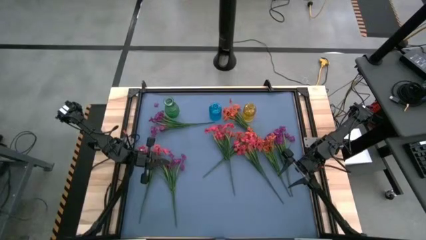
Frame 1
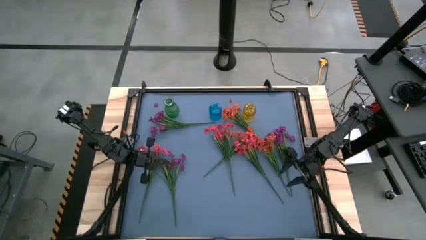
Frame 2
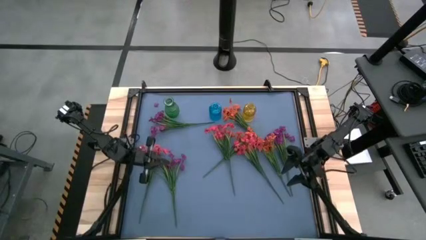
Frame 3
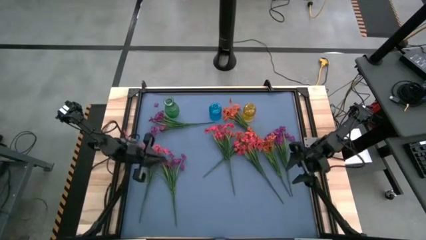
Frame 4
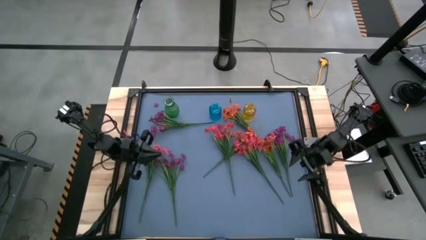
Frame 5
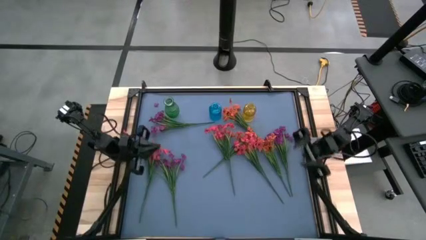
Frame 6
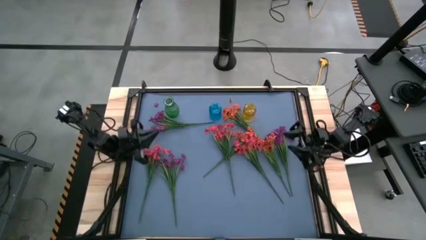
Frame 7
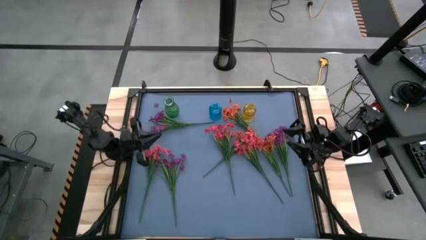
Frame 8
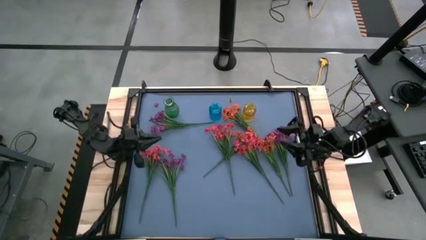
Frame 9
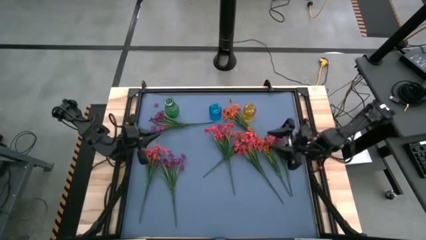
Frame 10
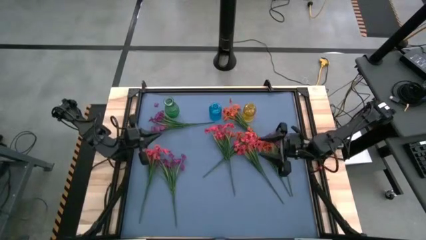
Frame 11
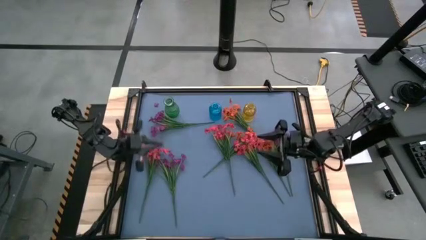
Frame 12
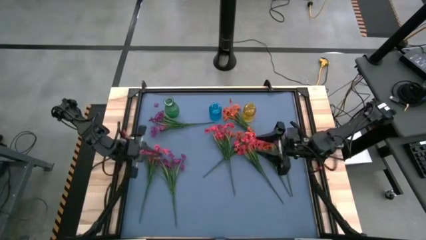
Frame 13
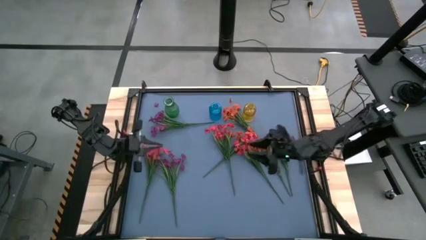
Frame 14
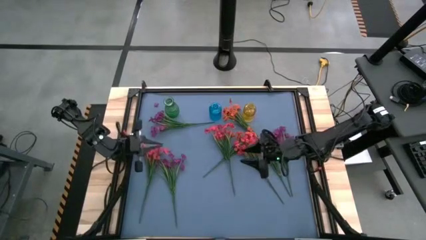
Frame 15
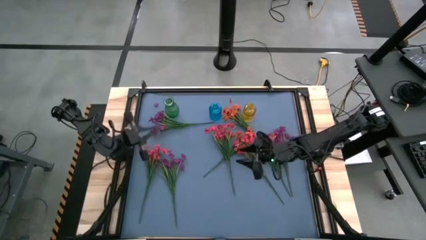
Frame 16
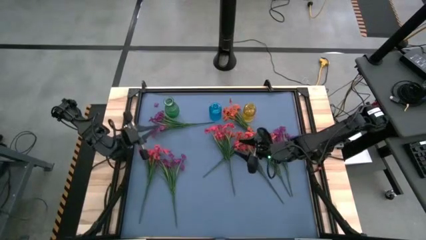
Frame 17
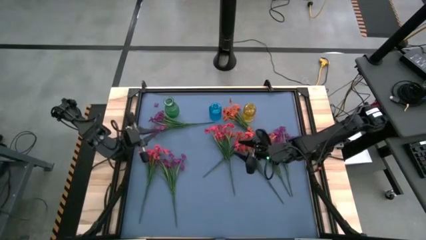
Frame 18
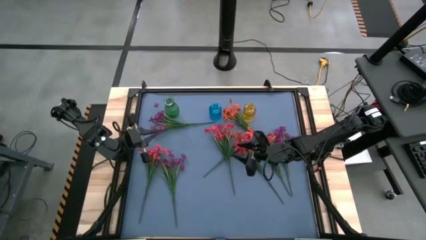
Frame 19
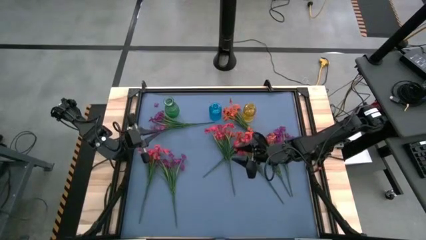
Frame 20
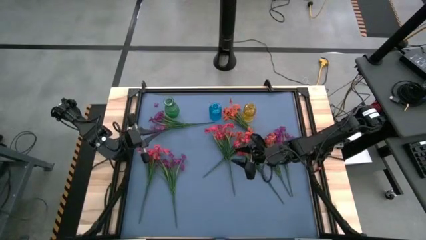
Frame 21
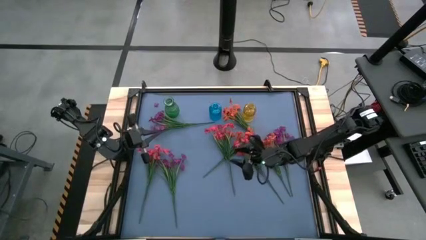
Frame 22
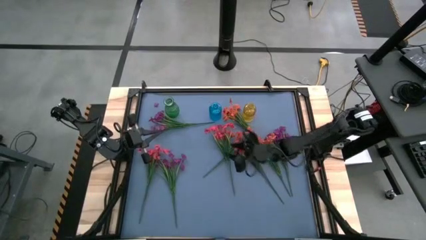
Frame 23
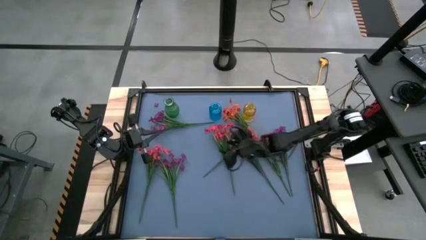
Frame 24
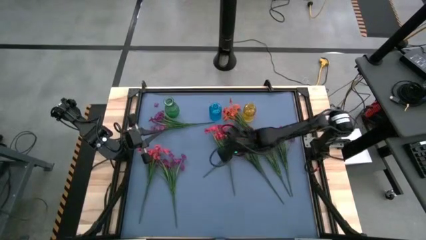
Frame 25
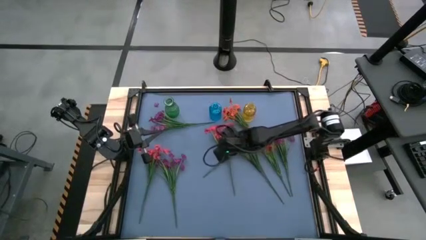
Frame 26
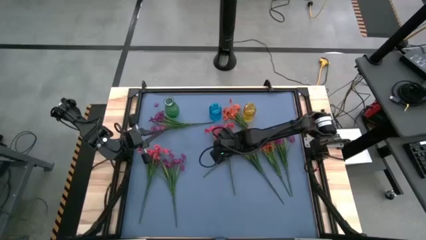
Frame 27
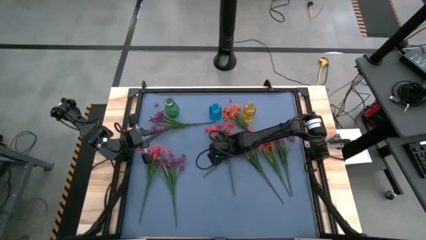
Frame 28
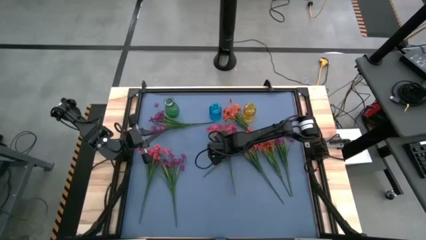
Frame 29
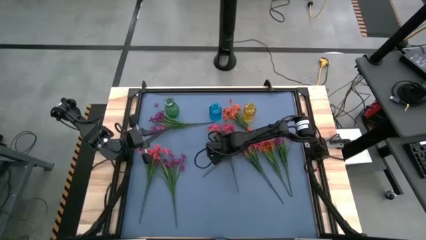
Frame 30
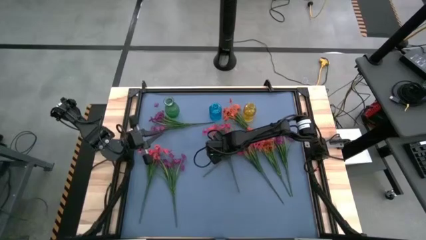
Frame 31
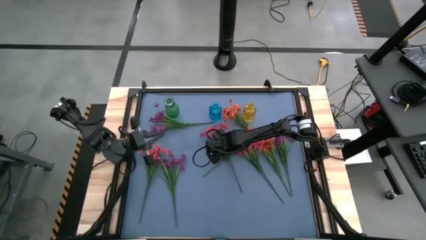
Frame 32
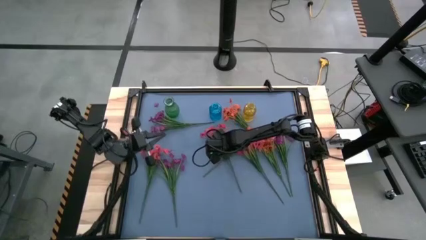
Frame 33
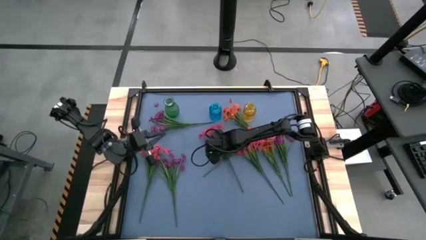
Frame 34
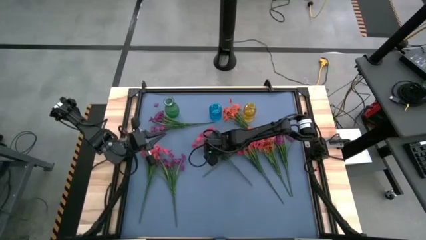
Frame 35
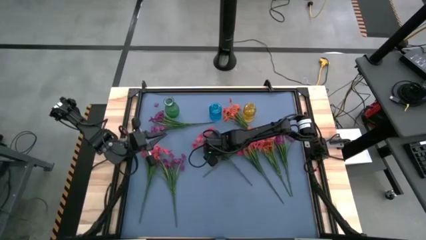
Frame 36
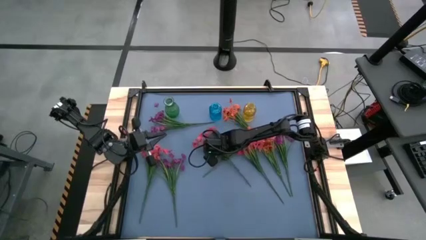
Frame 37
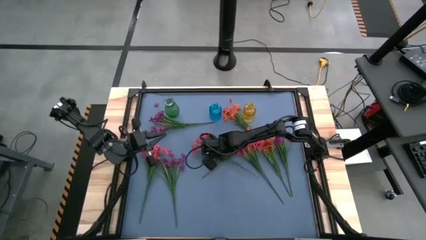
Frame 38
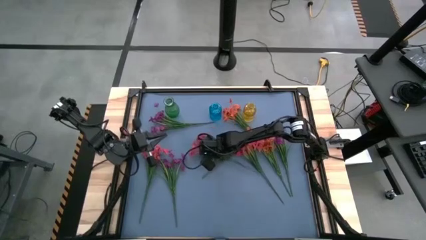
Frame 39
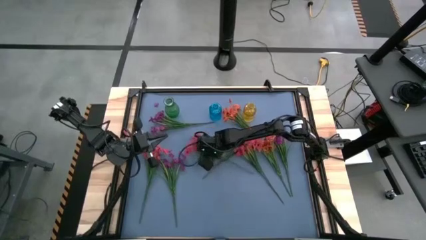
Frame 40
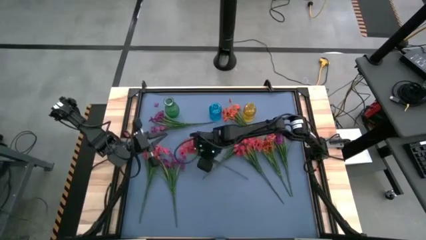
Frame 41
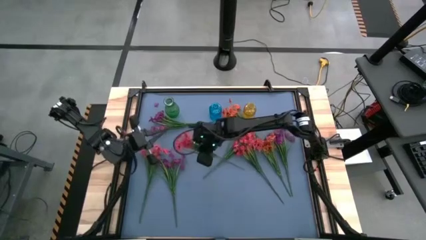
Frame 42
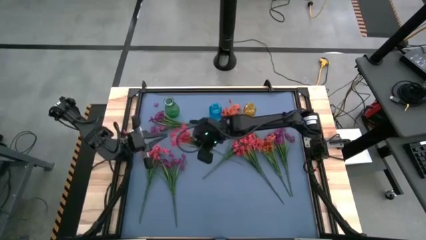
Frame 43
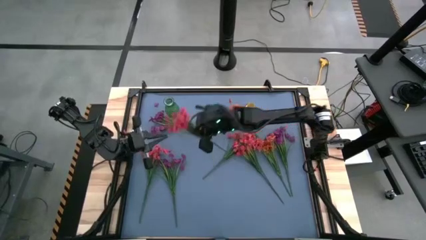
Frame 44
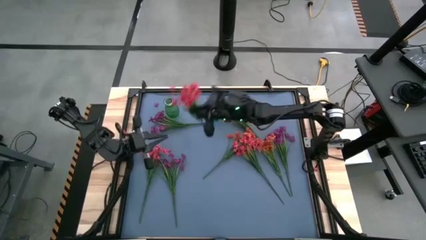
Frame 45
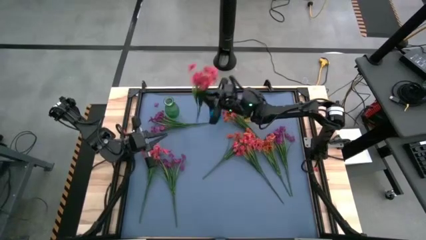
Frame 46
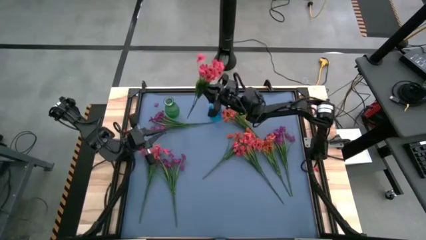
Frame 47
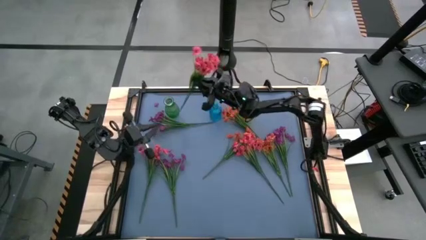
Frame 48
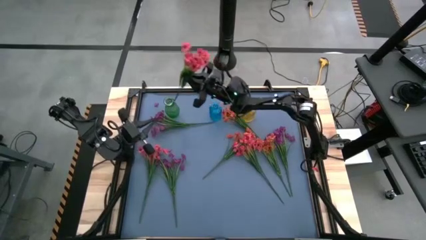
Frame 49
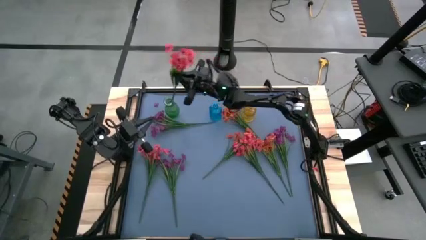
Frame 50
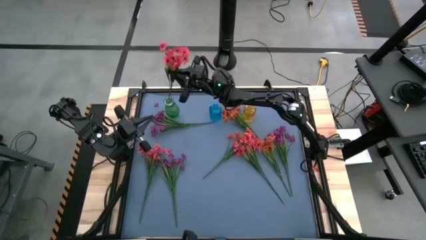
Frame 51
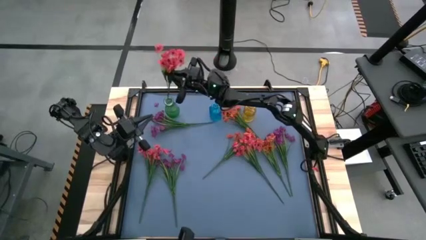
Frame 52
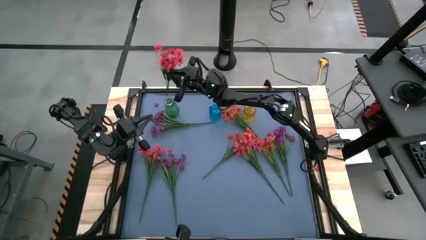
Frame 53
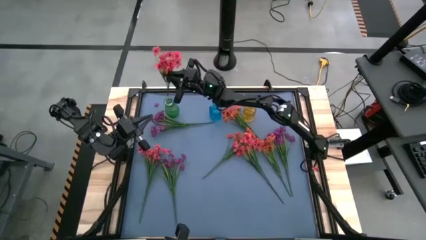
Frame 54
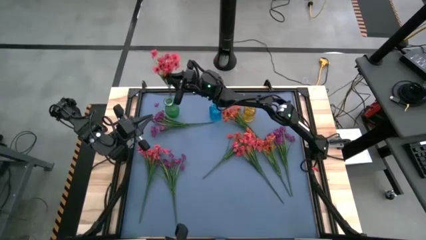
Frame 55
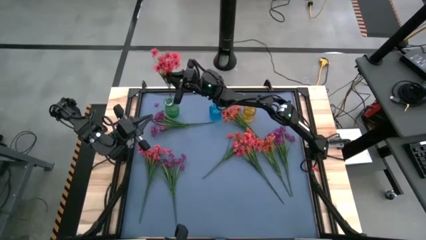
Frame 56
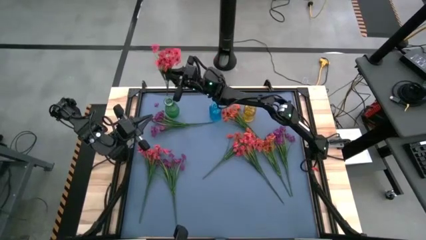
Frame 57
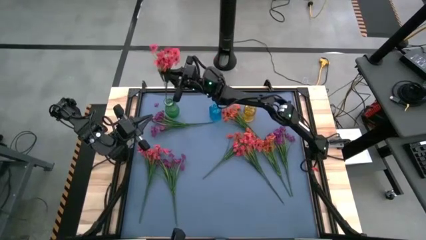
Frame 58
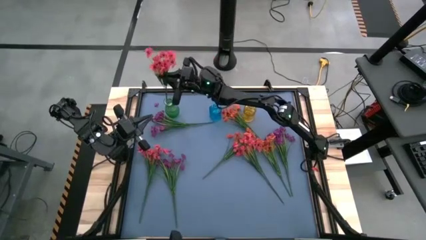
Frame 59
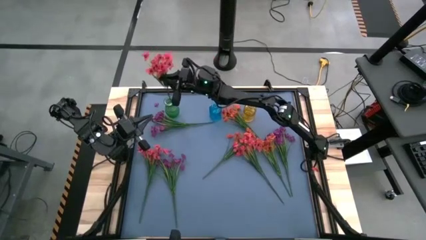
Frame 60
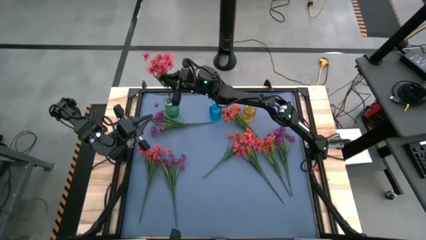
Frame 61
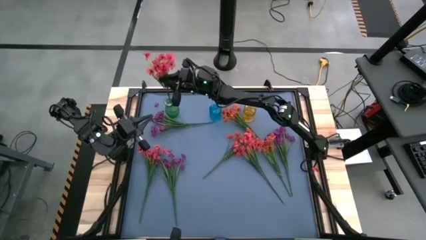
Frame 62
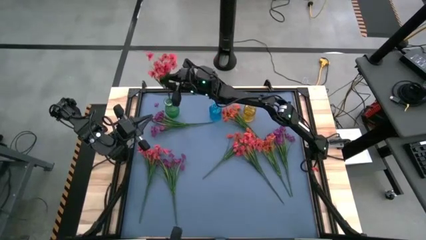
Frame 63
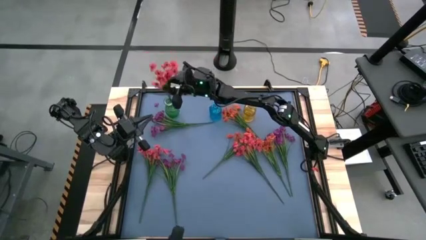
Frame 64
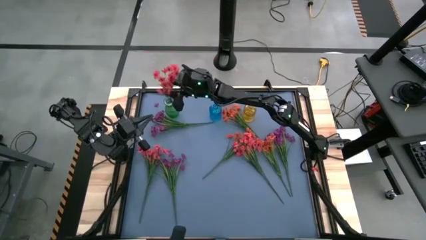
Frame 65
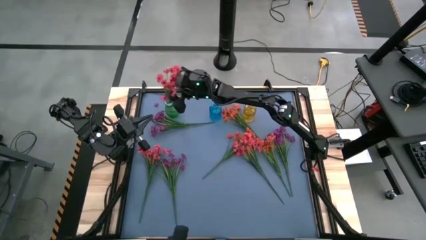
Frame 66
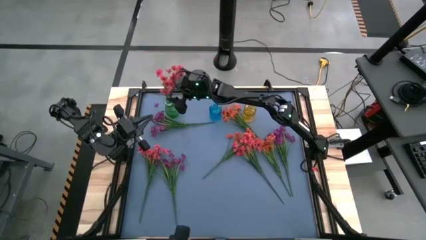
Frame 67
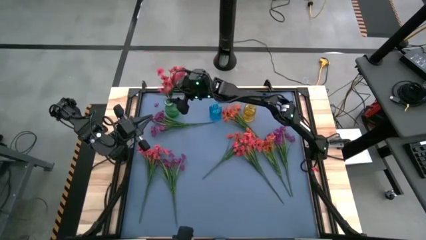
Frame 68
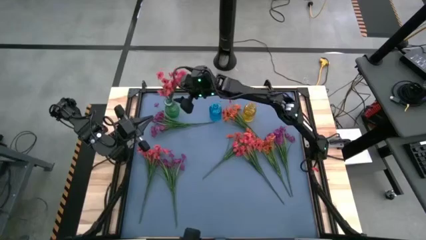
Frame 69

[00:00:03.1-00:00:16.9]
Task: Sort flowers into vase by color
Put the center pink flower into the green vase
